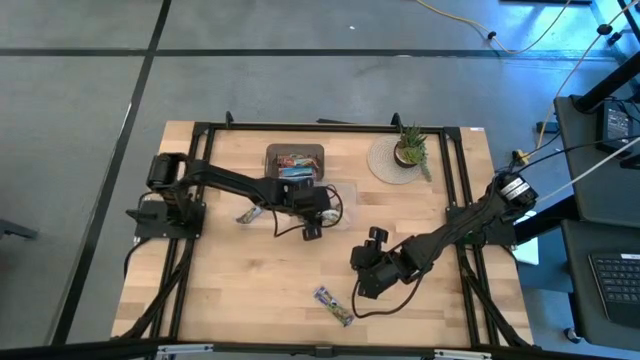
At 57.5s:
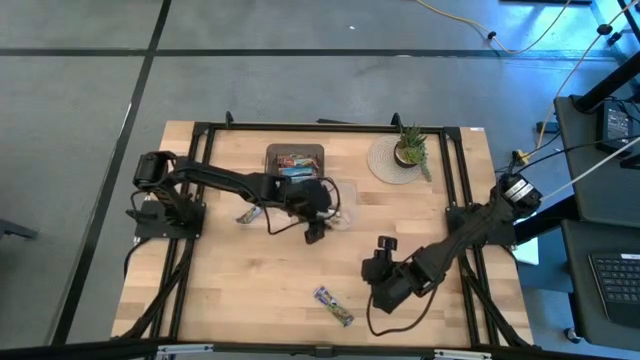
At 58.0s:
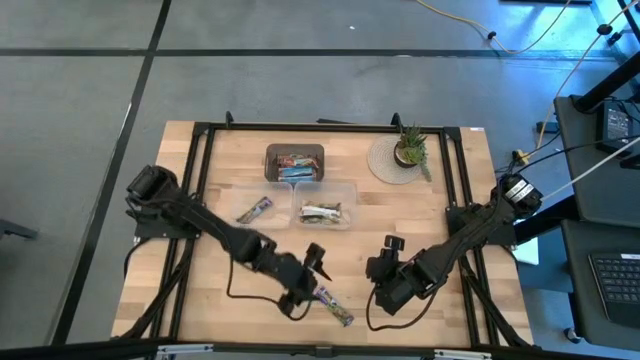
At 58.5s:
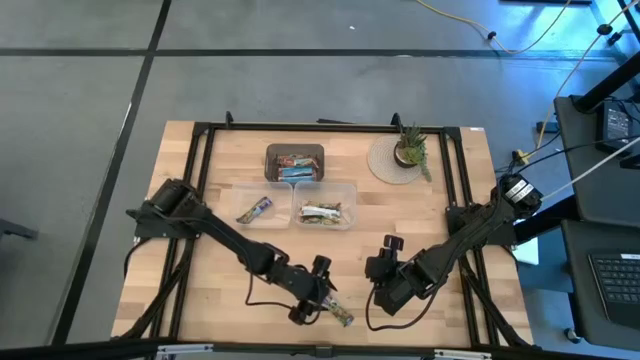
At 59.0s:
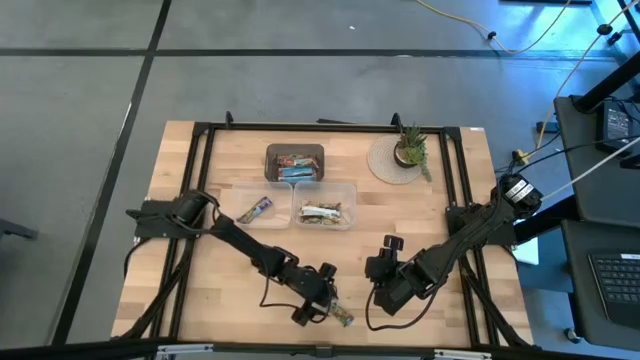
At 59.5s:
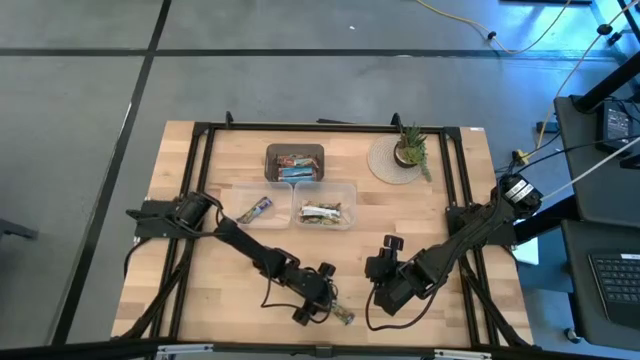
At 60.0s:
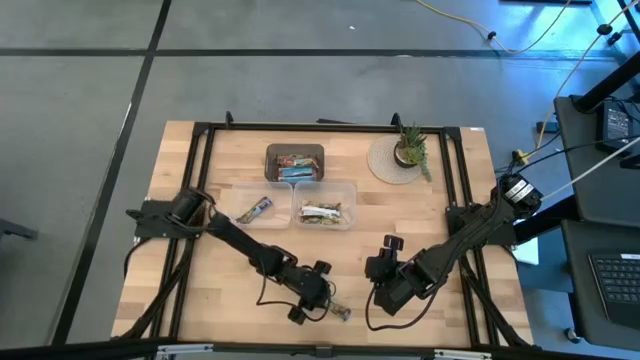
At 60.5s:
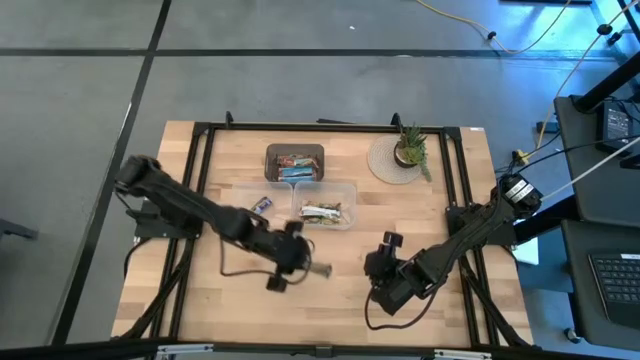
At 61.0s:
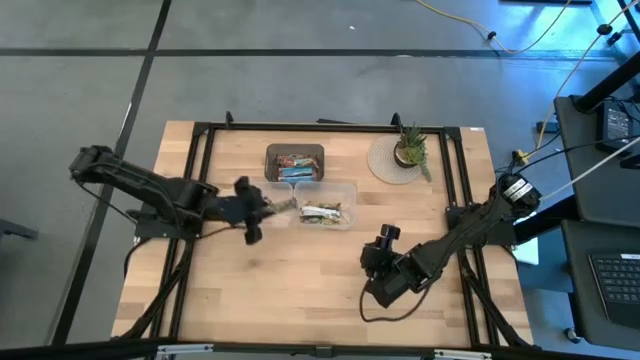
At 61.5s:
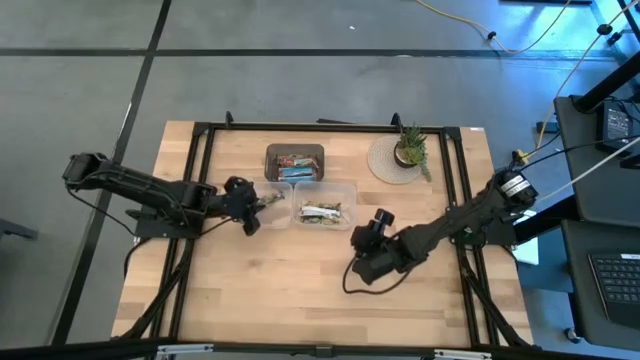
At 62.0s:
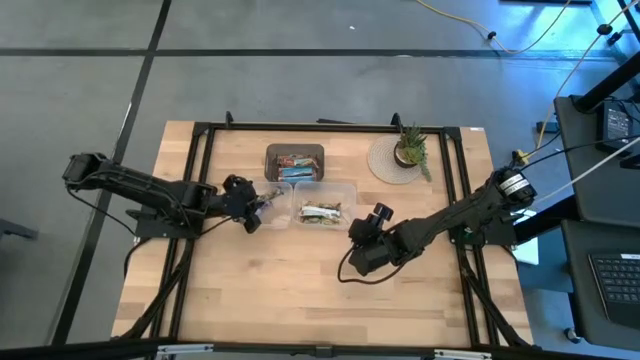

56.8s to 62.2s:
Task: Pick and place Granola Bars by type
Put the blue granola bar into the left transparent bin

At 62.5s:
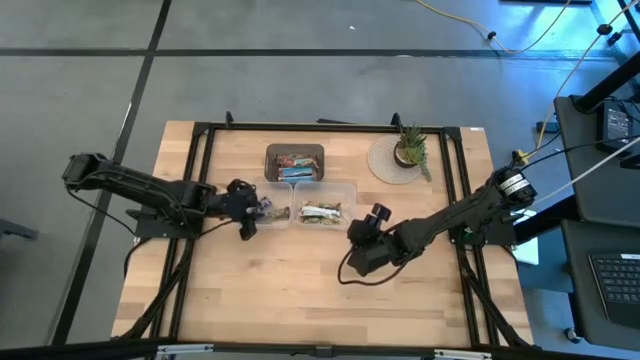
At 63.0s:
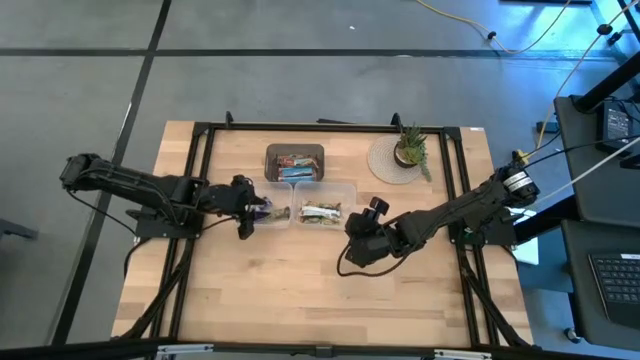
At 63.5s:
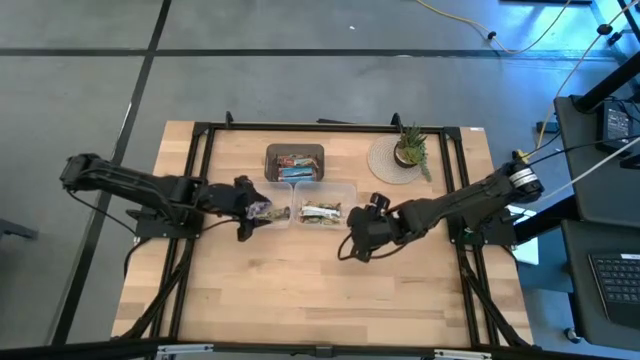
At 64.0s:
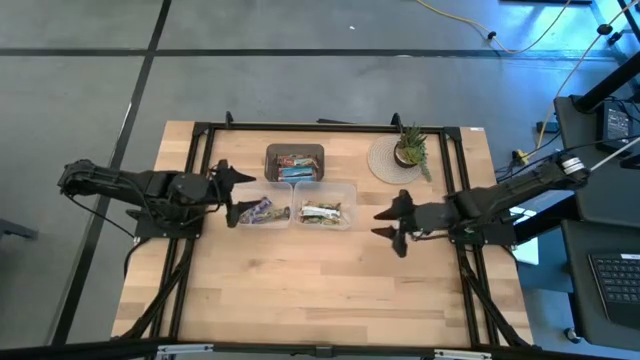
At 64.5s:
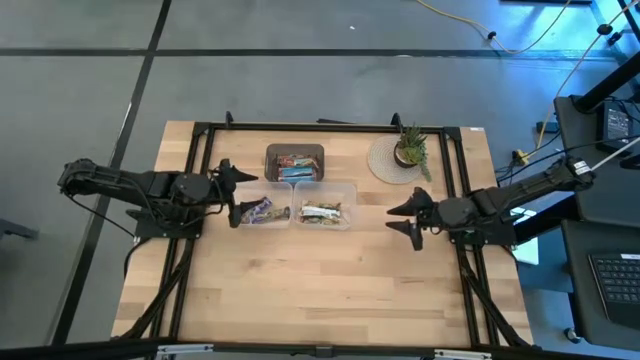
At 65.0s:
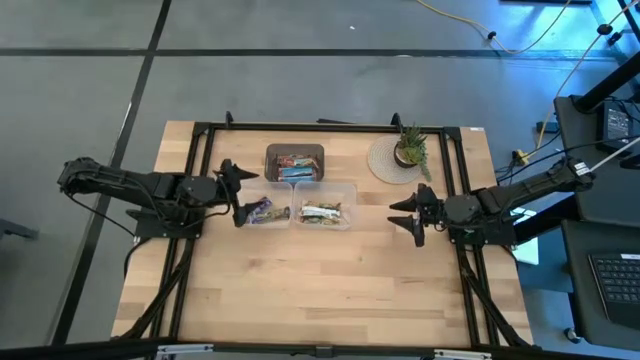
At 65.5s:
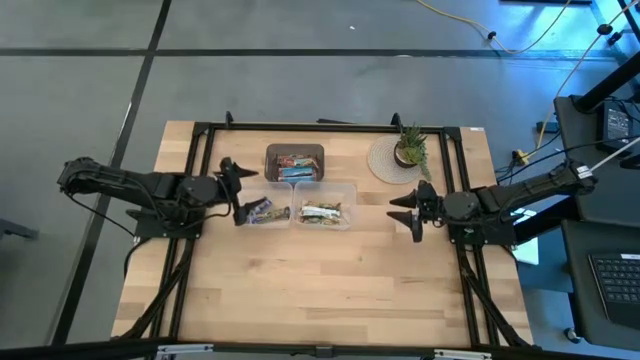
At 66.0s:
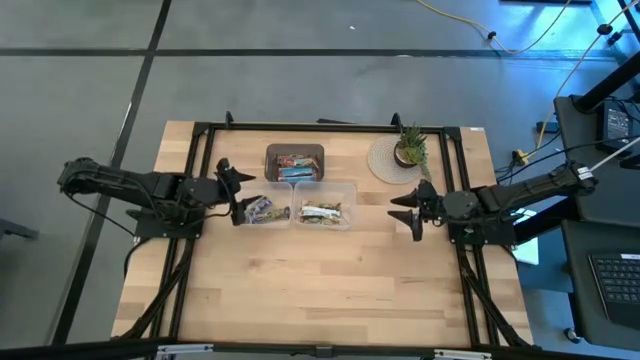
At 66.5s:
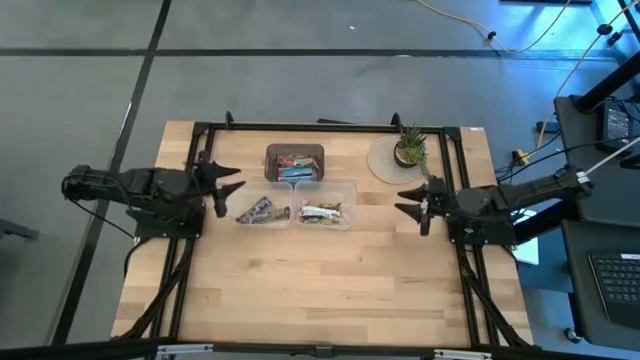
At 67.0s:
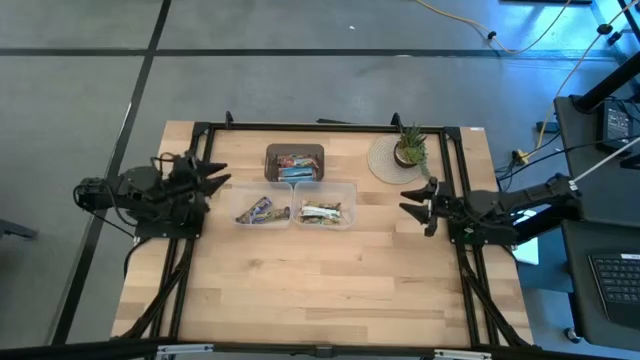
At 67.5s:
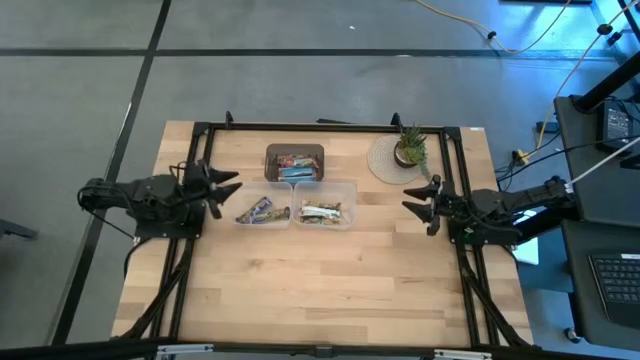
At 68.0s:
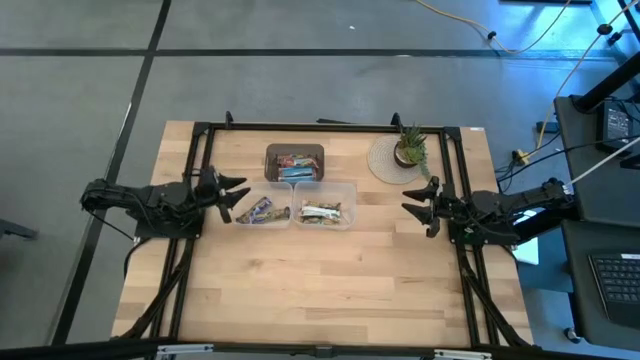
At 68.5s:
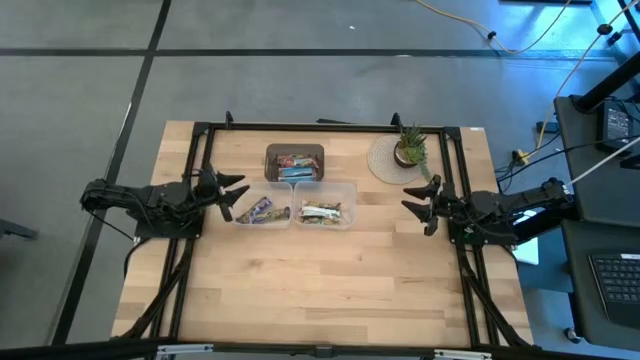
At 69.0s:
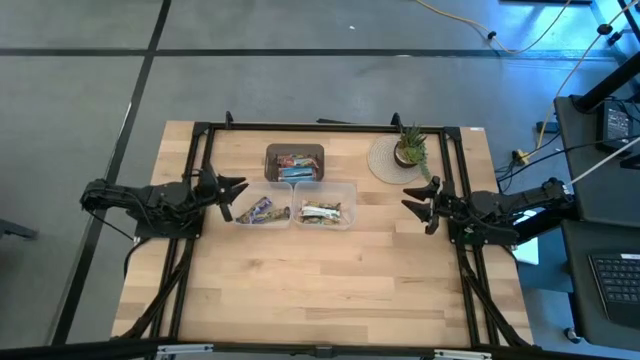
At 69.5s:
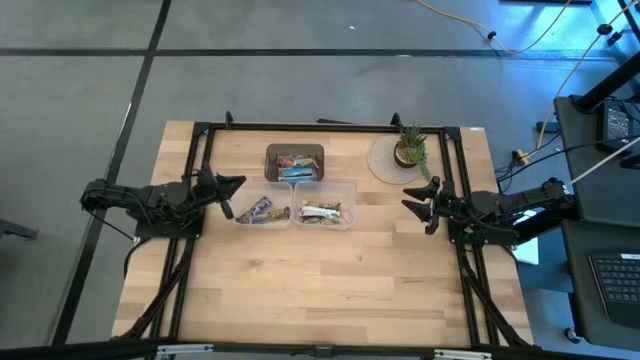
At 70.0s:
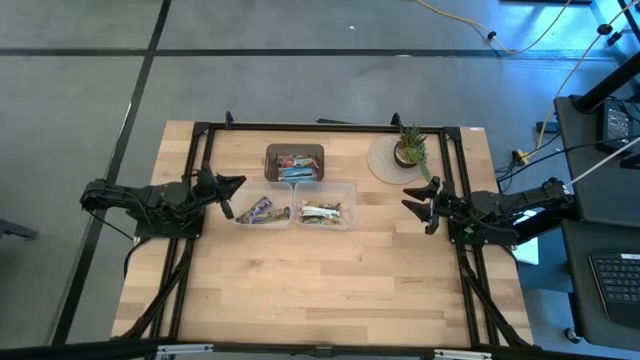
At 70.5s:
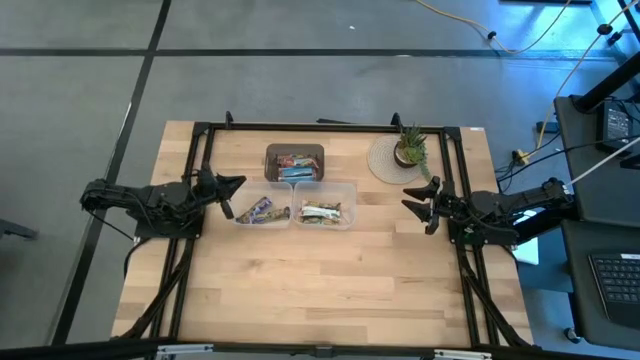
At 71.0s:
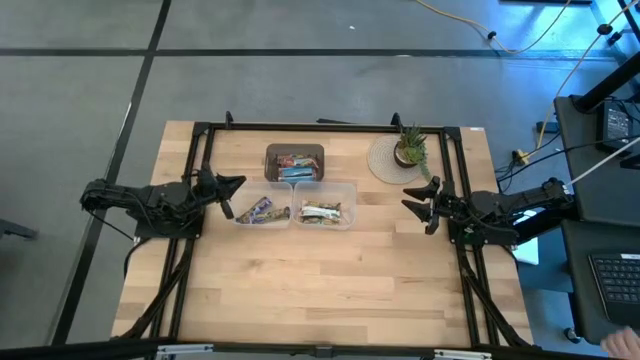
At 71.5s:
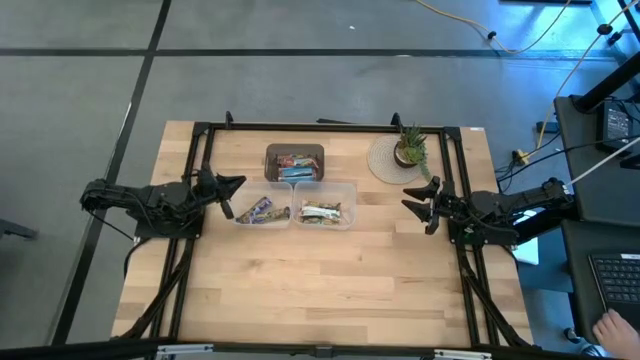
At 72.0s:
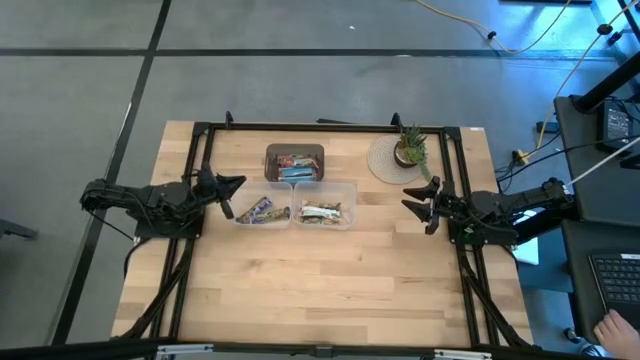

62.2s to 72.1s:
Return to Home Position

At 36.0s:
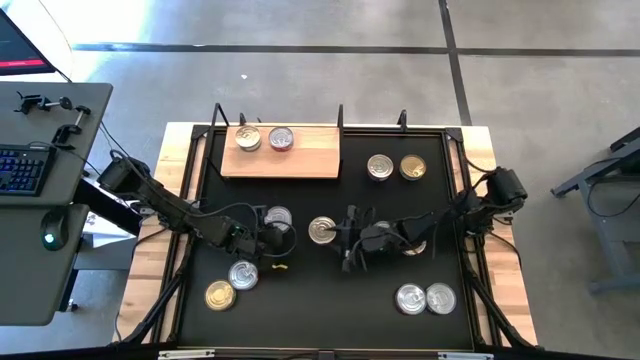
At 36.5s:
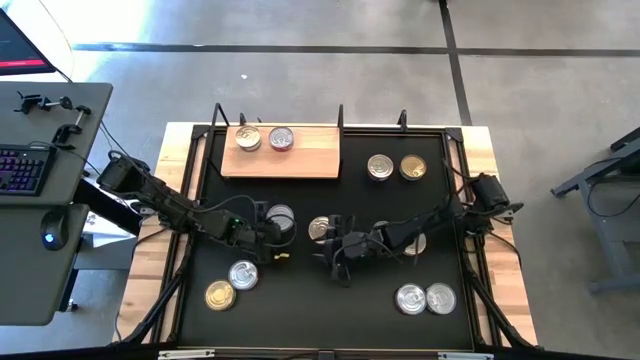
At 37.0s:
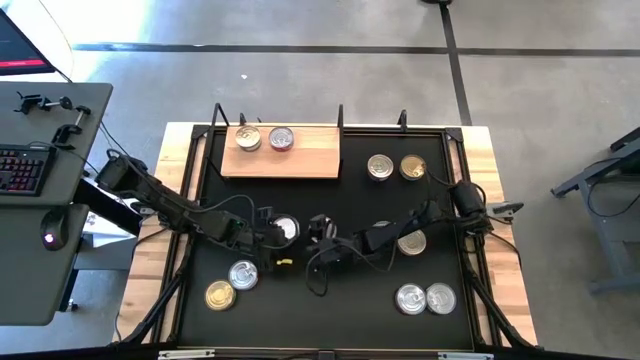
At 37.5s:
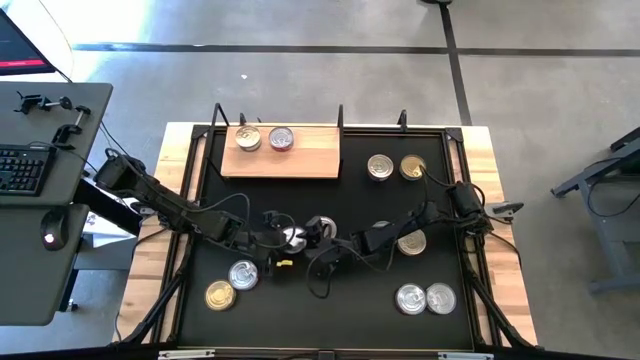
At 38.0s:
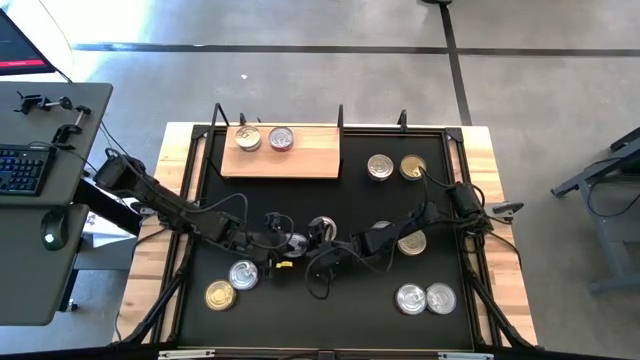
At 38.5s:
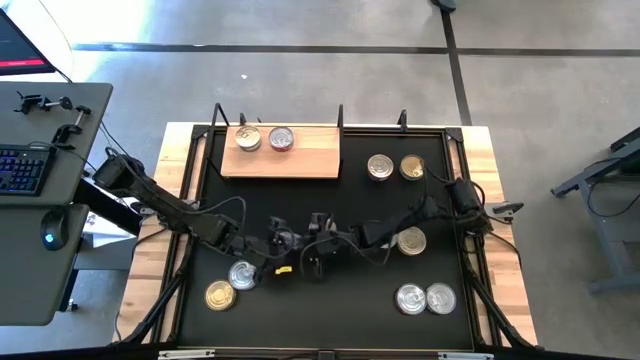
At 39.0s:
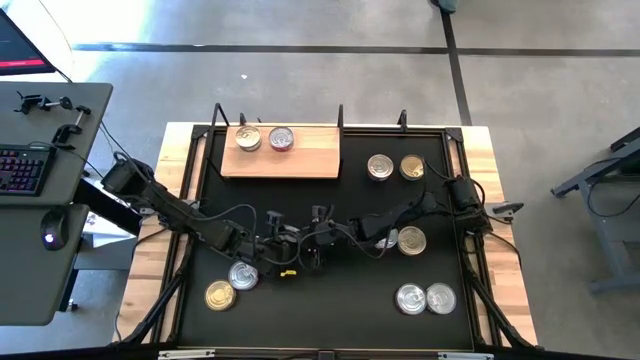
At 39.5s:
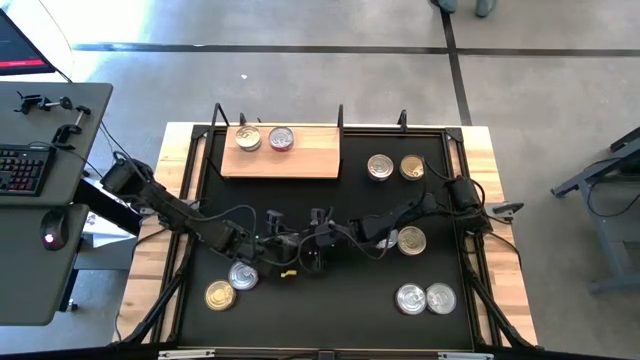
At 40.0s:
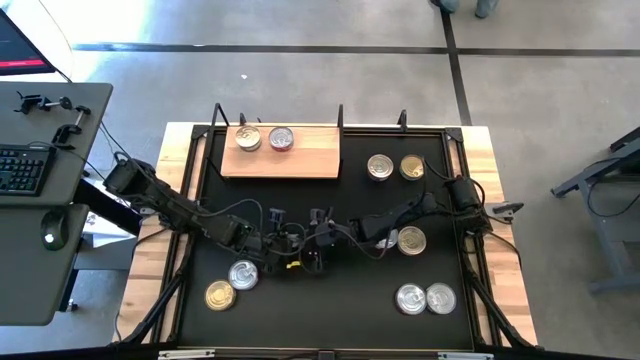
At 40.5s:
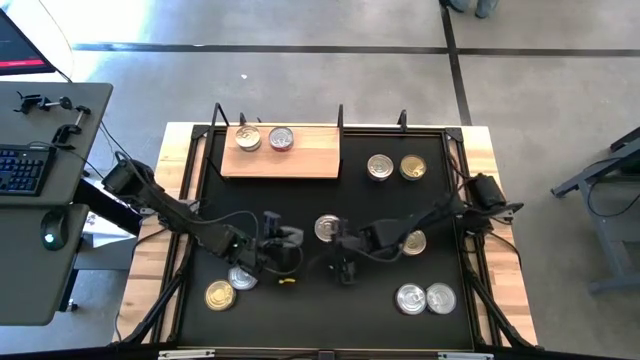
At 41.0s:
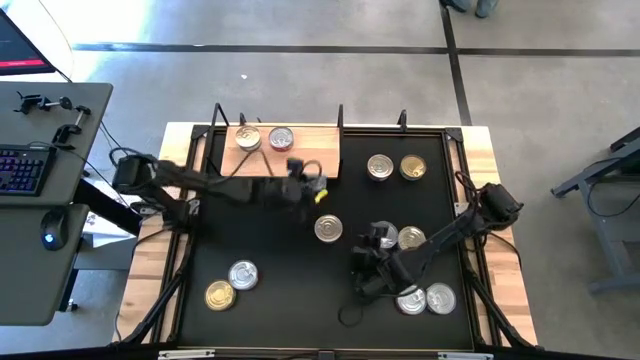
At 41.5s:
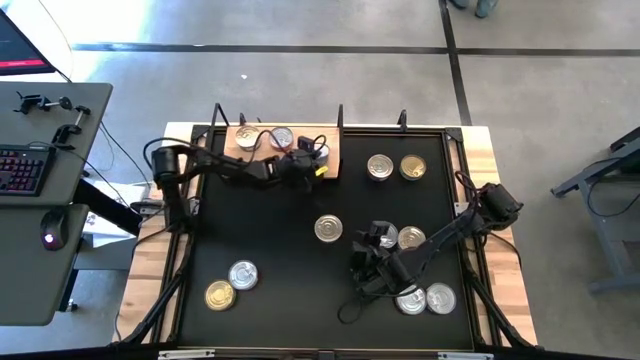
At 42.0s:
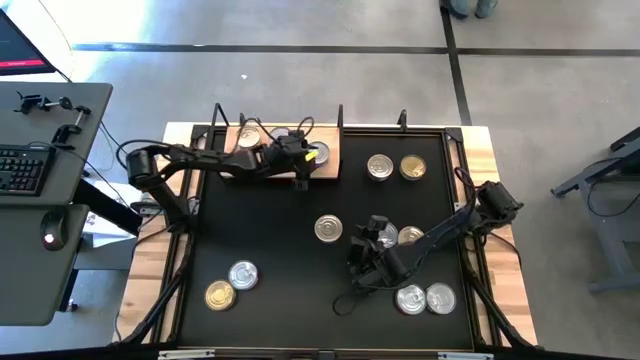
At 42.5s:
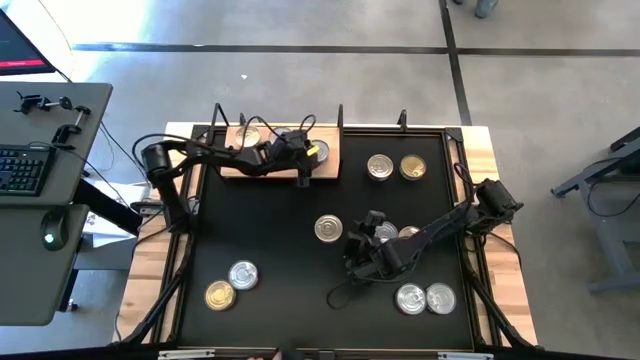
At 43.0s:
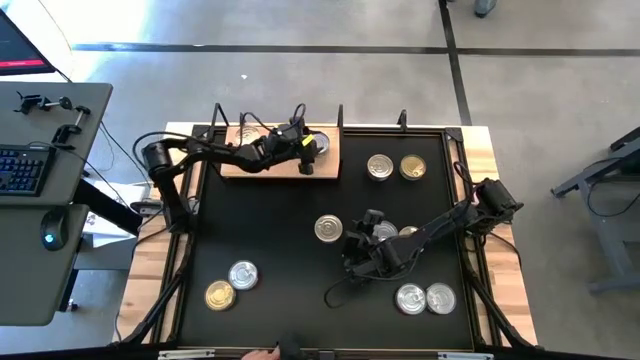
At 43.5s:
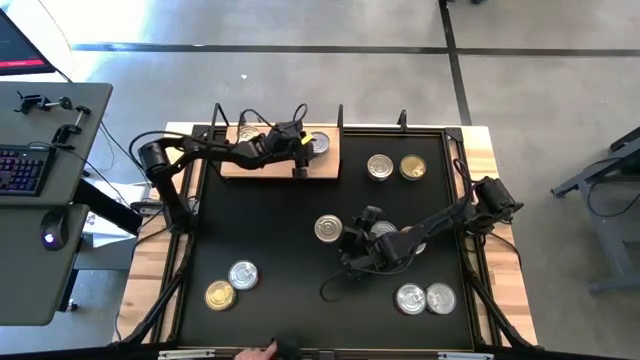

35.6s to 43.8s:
Task: Stack canned seafood by type on shelf
Put the green tuna can on the shelf
